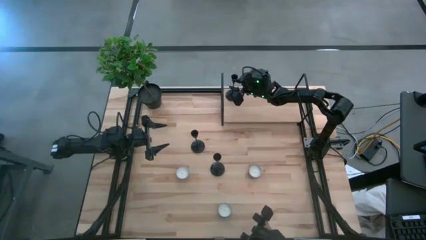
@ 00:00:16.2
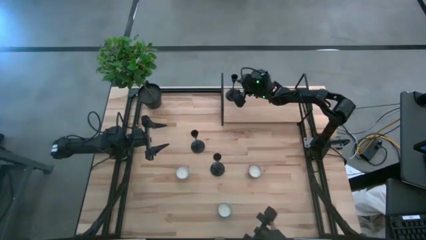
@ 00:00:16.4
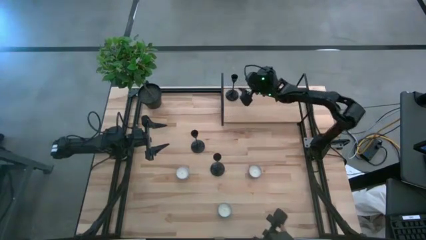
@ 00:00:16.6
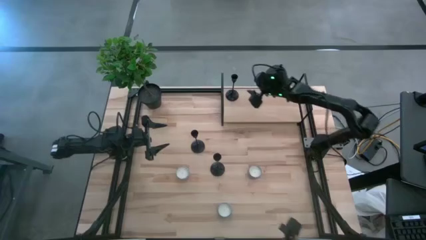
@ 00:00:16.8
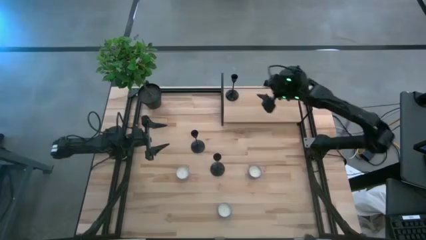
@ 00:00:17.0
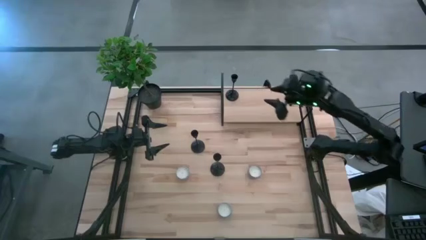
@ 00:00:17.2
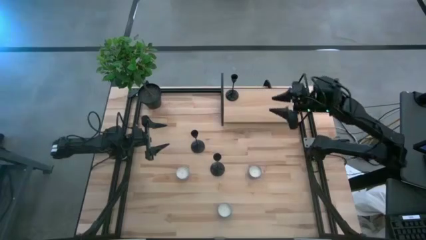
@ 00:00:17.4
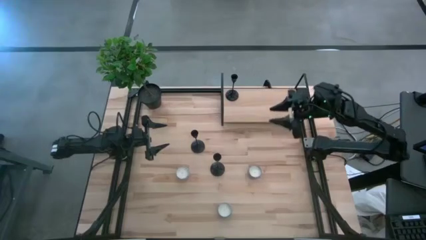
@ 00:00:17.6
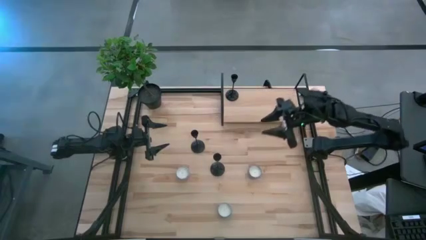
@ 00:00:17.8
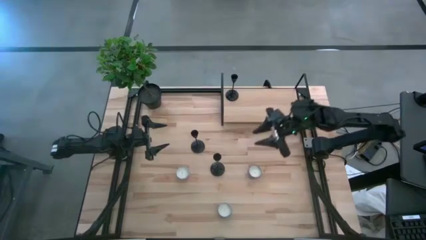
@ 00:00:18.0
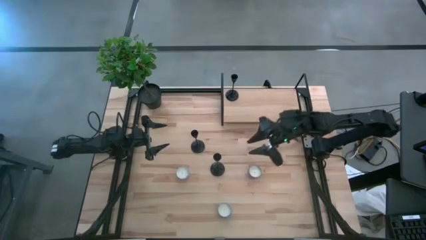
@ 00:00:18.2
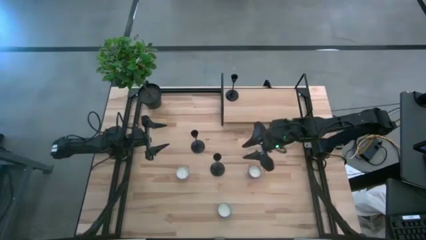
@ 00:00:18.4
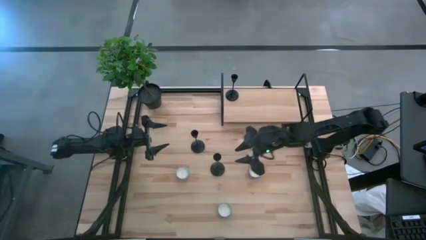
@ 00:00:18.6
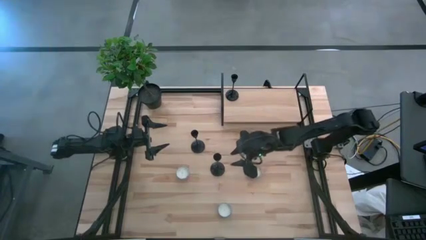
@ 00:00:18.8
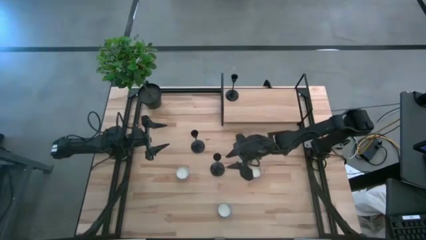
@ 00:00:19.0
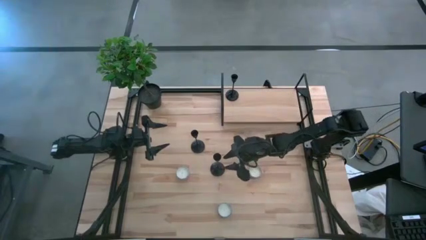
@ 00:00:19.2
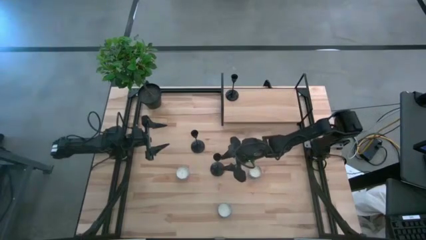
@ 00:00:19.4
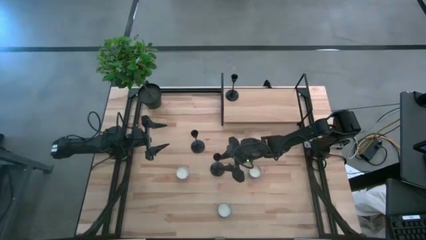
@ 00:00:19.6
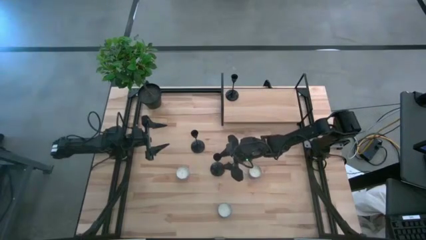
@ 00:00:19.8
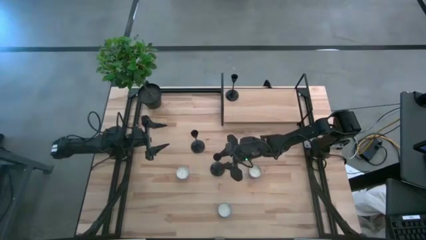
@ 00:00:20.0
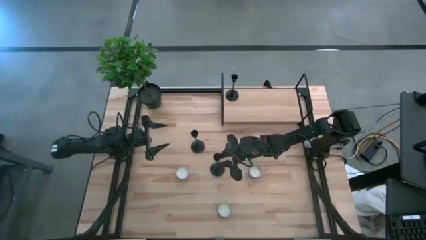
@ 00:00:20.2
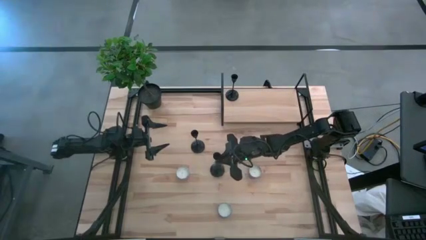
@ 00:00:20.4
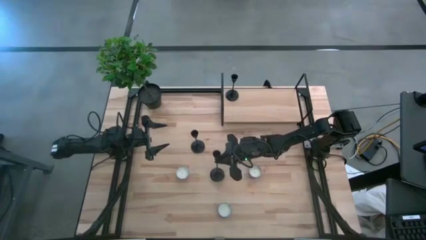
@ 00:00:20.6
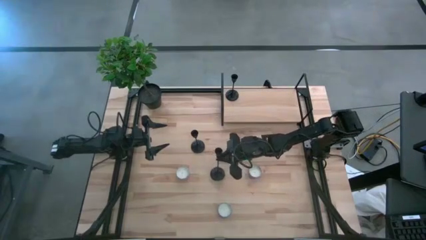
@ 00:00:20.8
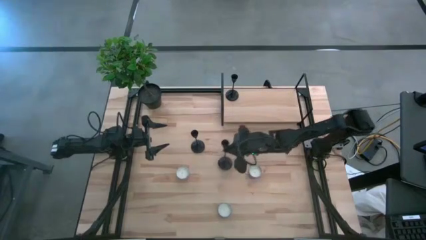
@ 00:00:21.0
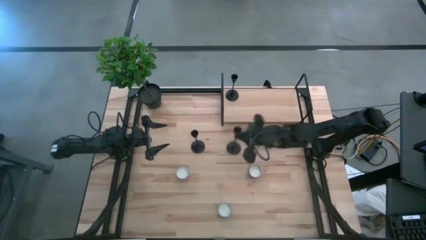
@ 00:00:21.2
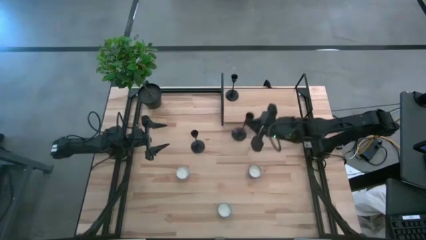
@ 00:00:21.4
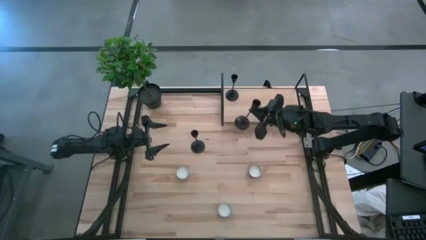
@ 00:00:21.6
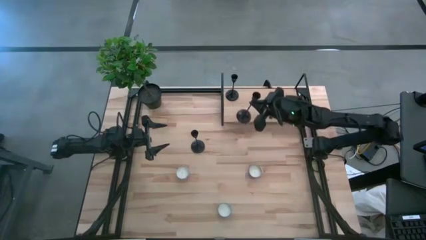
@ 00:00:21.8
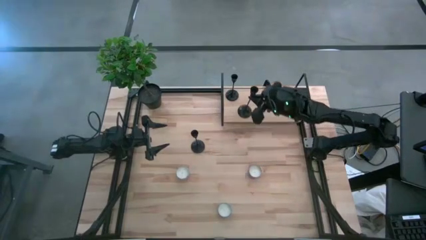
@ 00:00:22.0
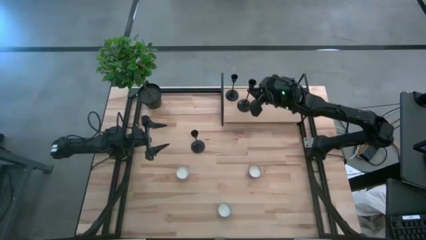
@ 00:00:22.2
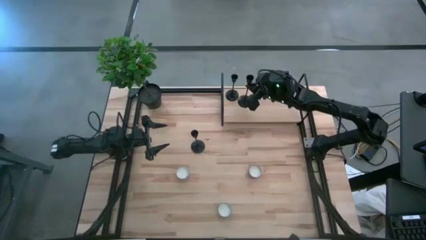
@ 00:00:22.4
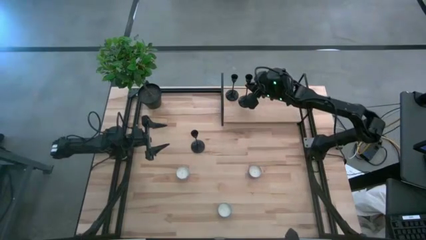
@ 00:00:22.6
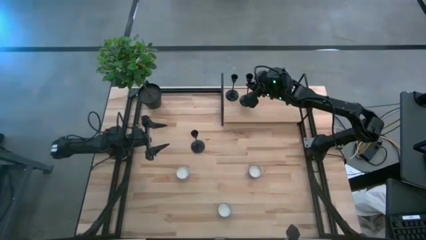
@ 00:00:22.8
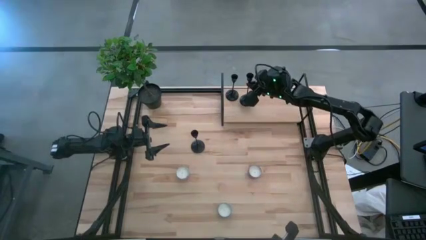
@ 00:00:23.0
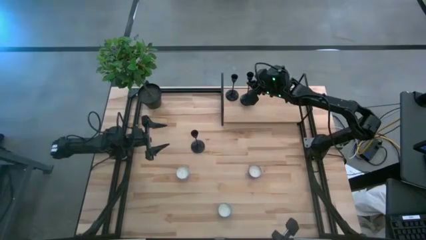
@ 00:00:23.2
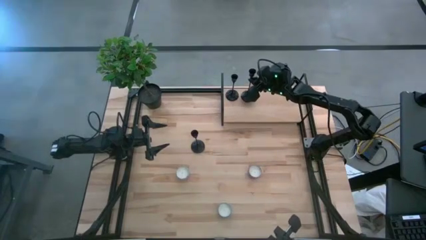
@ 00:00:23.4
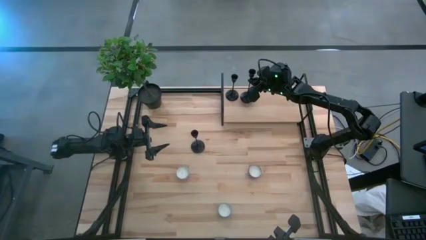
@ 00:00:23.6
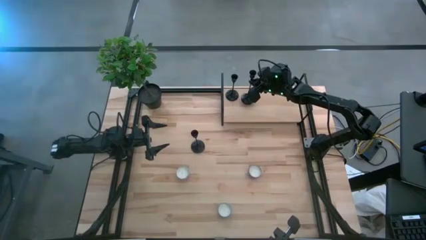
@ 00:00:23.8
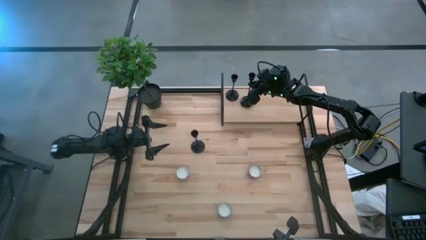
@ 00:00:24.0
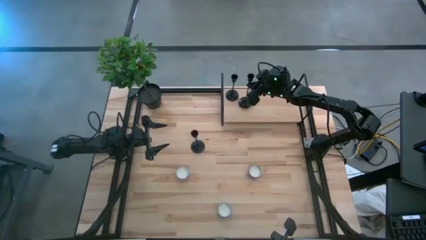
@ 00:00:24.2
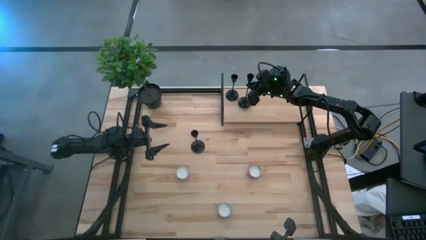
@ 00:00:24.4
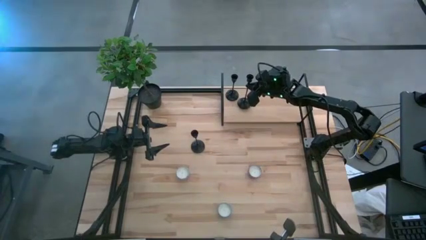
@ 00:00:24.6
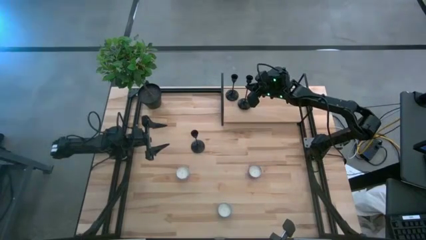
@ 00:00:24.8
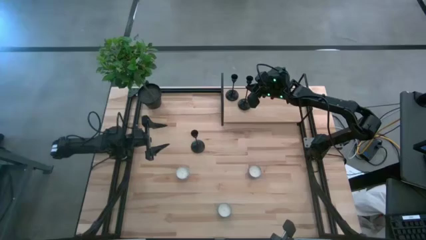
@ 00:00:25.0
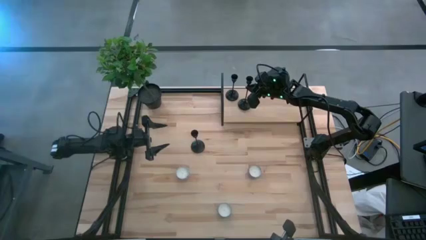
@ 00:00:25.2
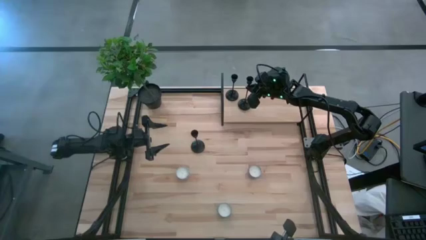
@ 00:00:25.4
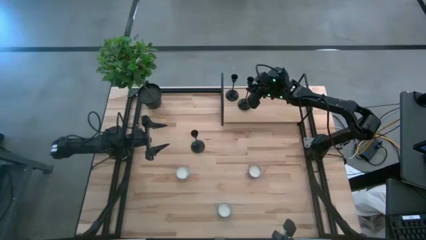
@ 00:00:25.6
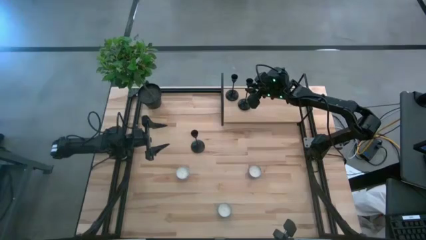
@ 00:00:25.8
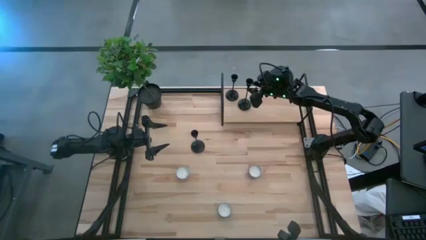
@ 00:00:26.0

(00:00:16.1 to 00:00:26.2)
Task: Pick & Place candle stick holders
Put the bottom black candle holder on the shelf
